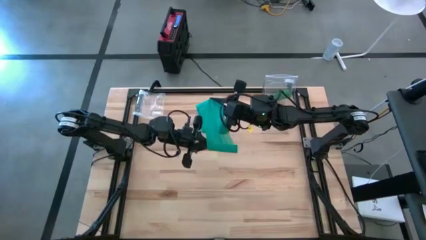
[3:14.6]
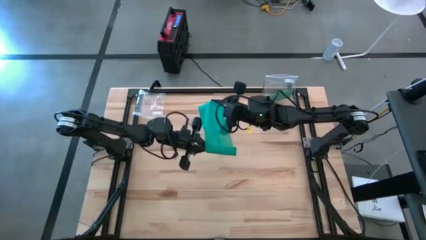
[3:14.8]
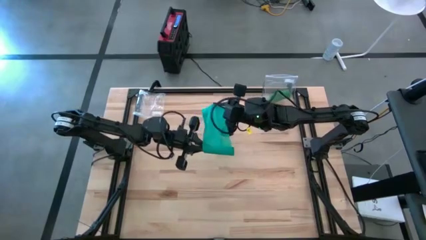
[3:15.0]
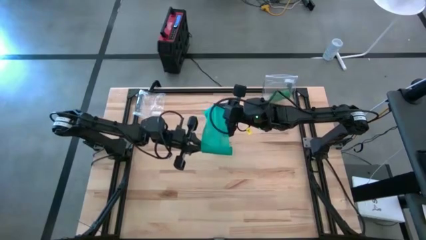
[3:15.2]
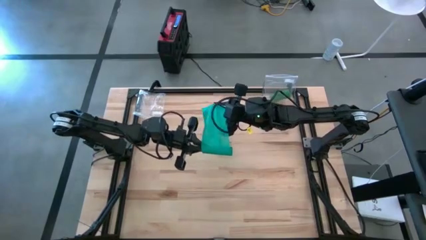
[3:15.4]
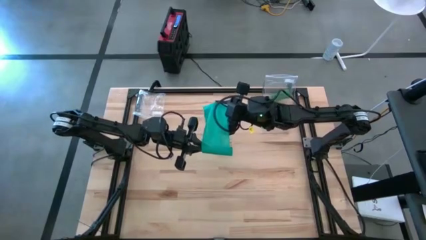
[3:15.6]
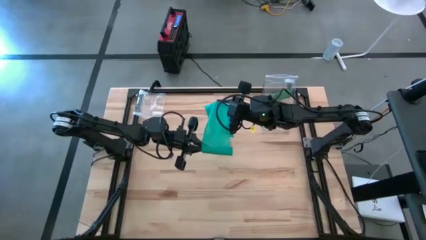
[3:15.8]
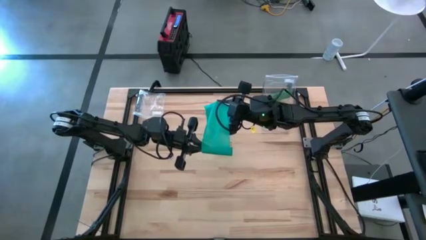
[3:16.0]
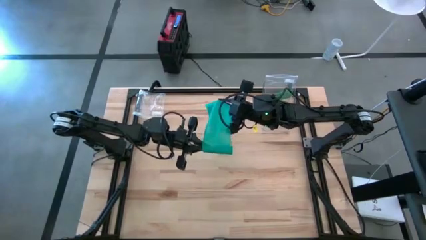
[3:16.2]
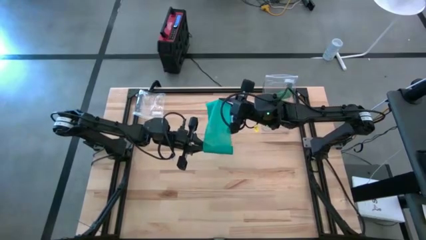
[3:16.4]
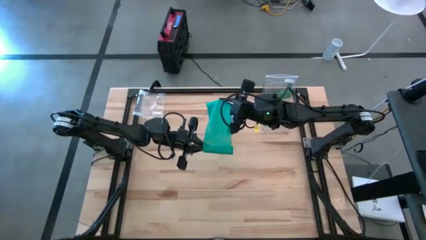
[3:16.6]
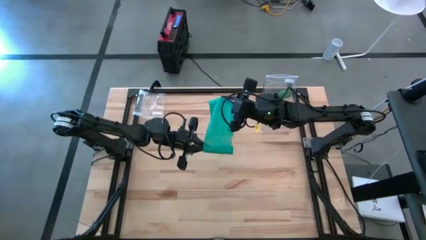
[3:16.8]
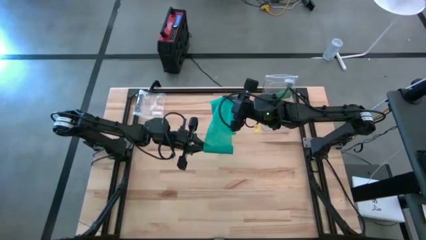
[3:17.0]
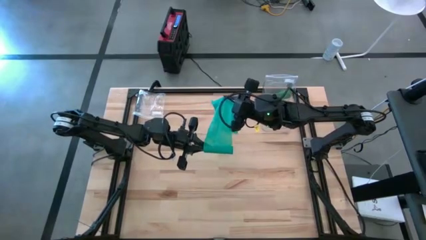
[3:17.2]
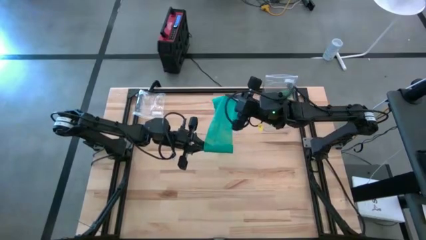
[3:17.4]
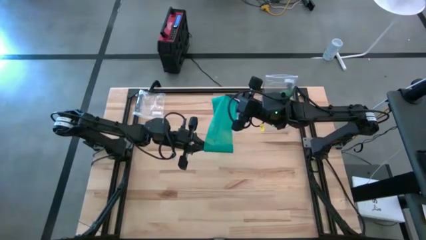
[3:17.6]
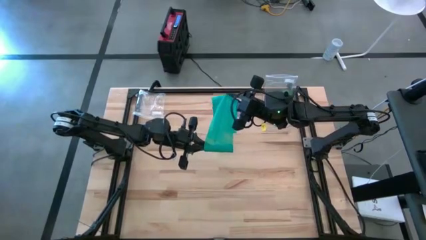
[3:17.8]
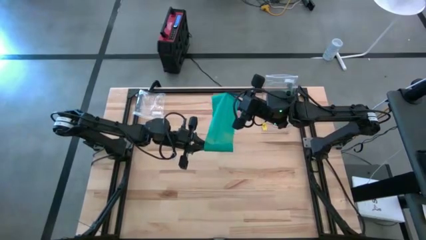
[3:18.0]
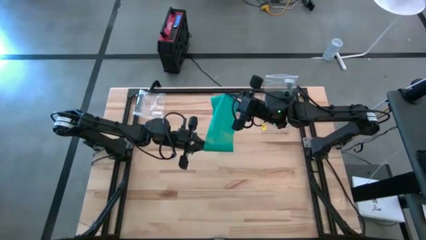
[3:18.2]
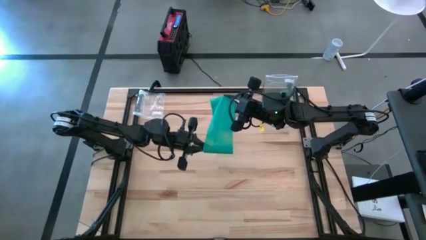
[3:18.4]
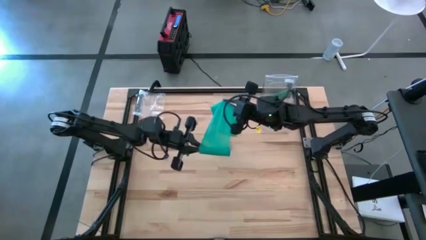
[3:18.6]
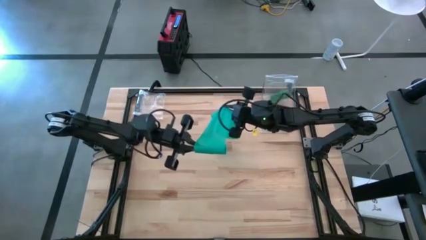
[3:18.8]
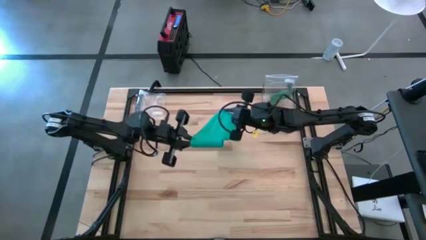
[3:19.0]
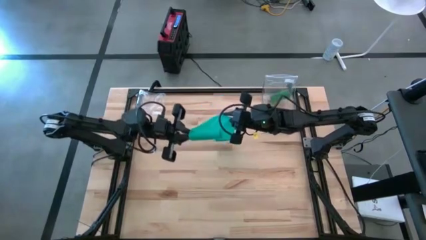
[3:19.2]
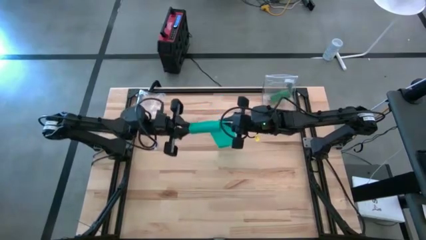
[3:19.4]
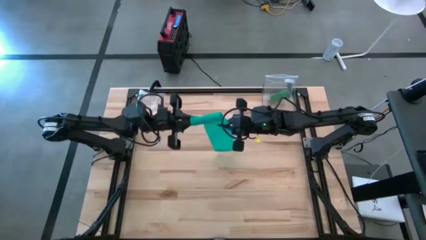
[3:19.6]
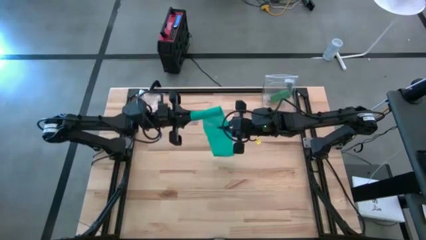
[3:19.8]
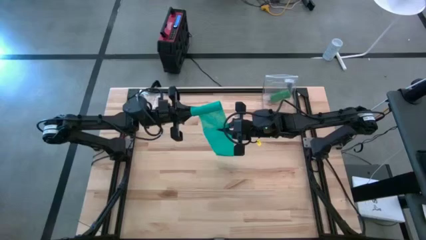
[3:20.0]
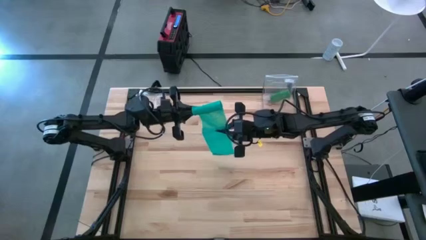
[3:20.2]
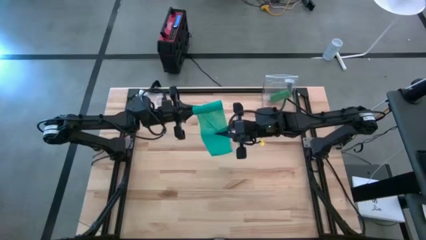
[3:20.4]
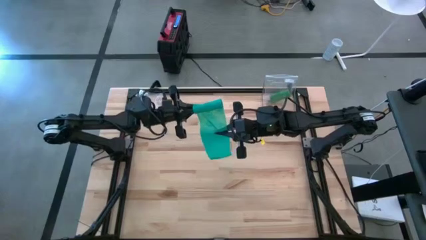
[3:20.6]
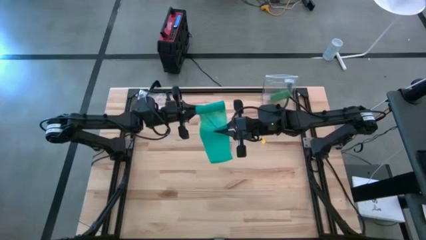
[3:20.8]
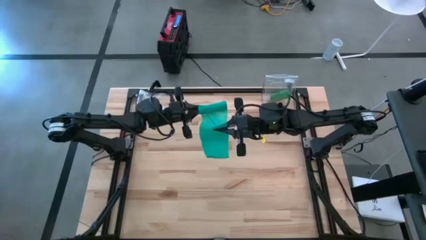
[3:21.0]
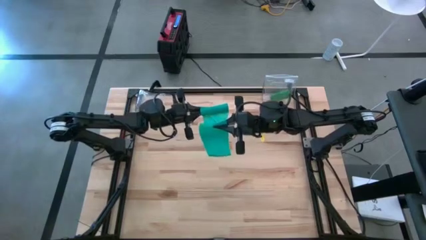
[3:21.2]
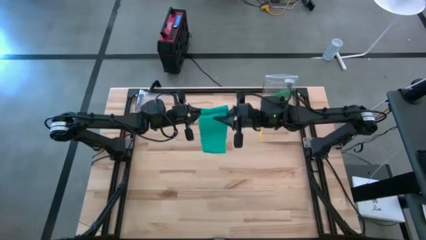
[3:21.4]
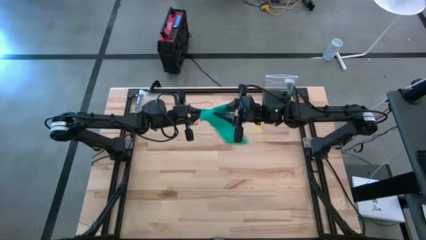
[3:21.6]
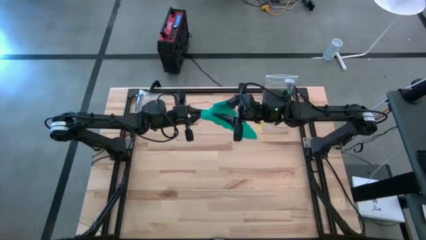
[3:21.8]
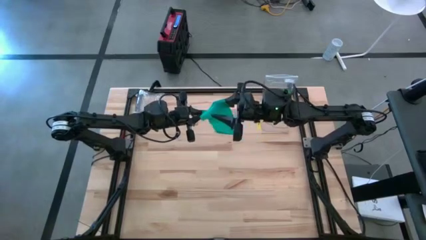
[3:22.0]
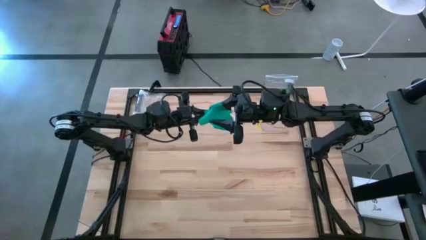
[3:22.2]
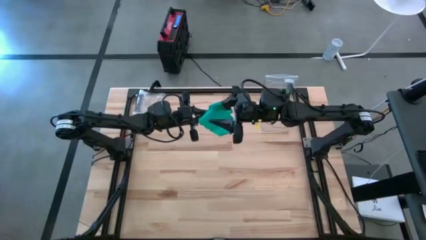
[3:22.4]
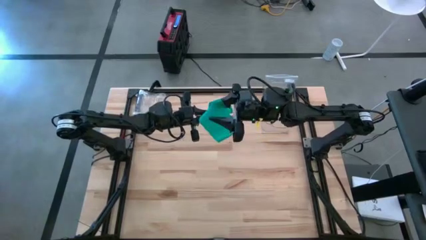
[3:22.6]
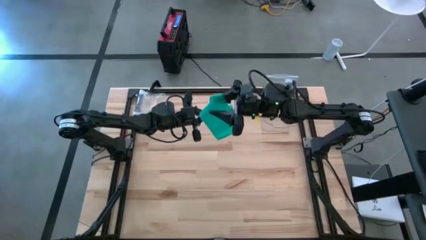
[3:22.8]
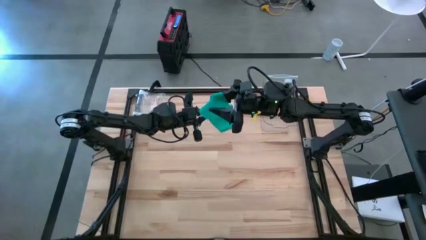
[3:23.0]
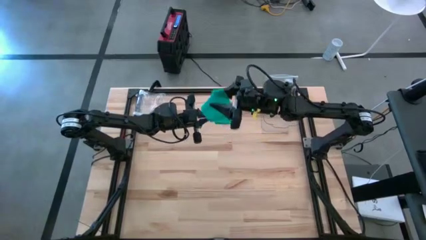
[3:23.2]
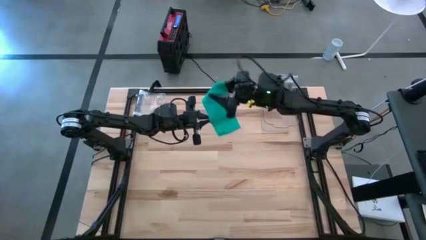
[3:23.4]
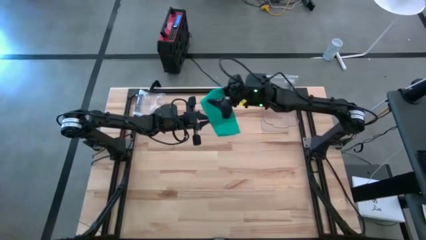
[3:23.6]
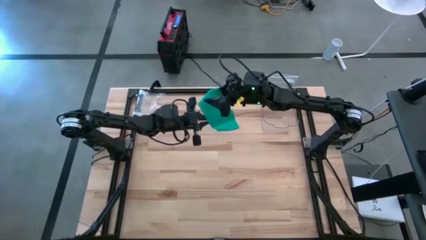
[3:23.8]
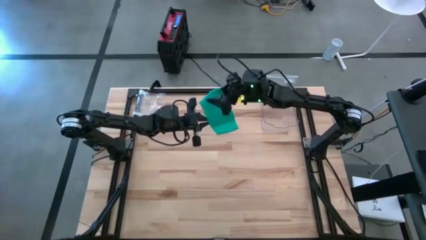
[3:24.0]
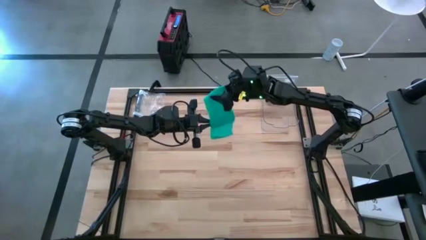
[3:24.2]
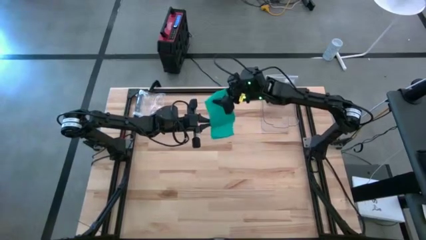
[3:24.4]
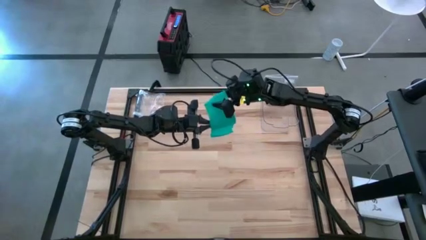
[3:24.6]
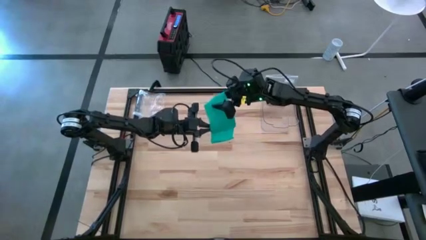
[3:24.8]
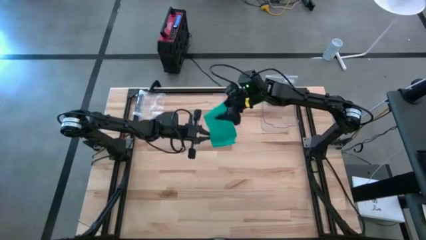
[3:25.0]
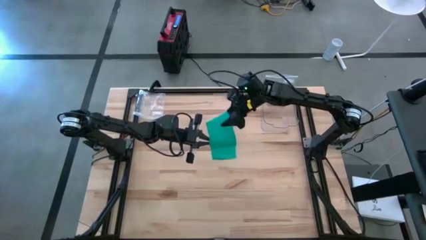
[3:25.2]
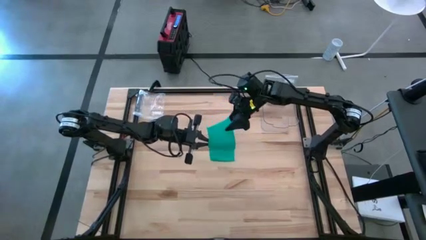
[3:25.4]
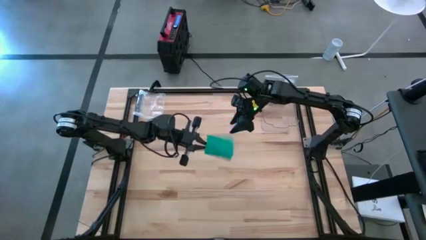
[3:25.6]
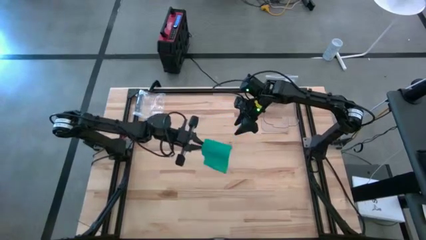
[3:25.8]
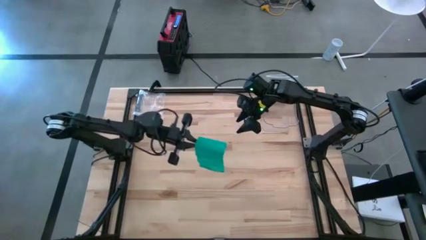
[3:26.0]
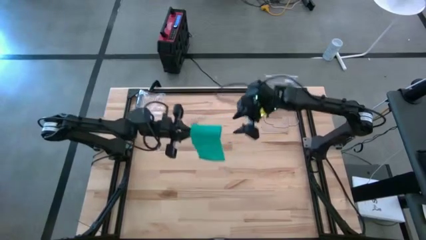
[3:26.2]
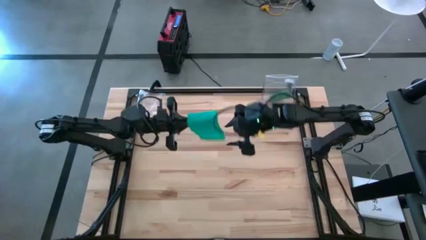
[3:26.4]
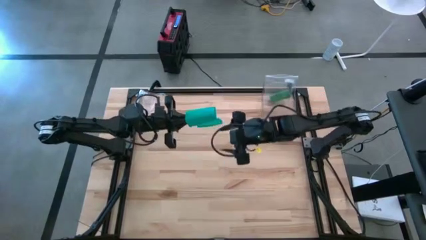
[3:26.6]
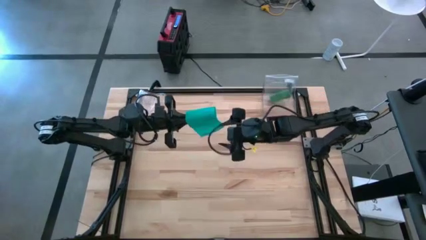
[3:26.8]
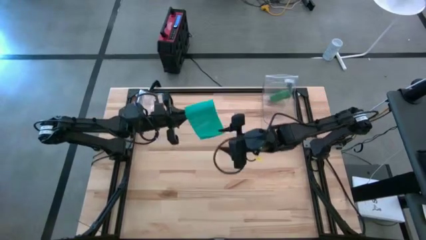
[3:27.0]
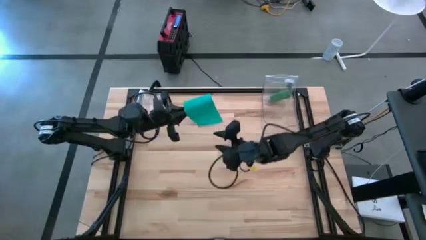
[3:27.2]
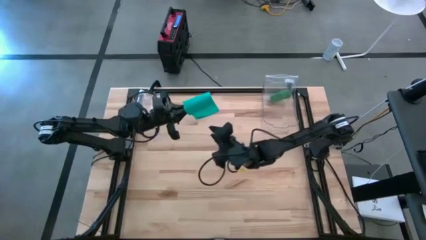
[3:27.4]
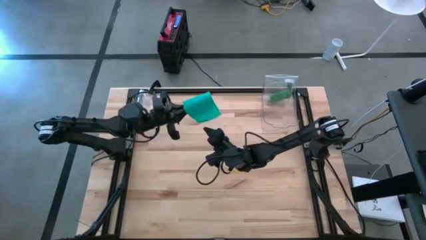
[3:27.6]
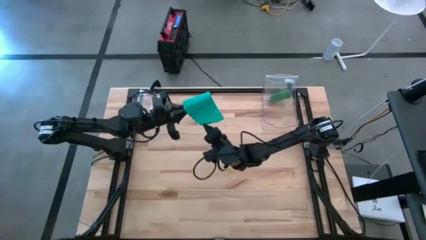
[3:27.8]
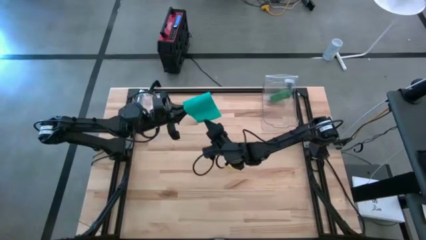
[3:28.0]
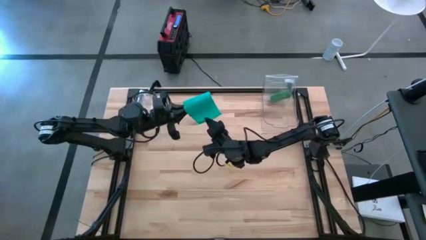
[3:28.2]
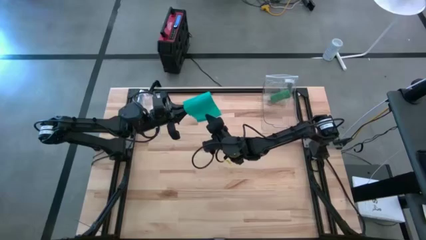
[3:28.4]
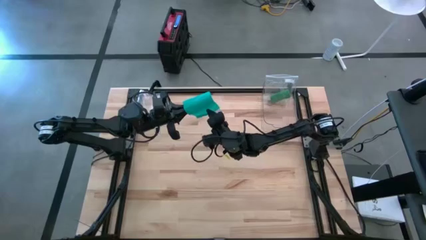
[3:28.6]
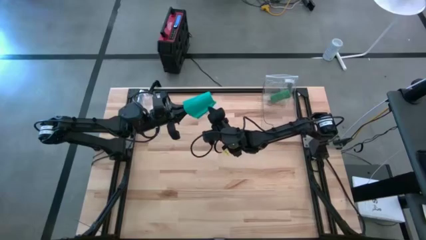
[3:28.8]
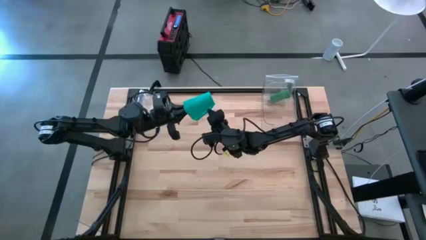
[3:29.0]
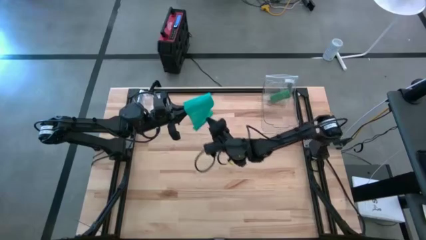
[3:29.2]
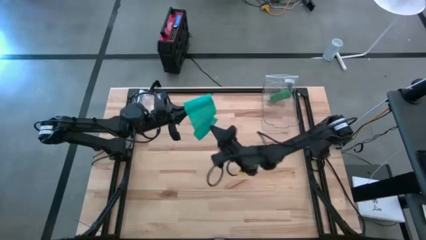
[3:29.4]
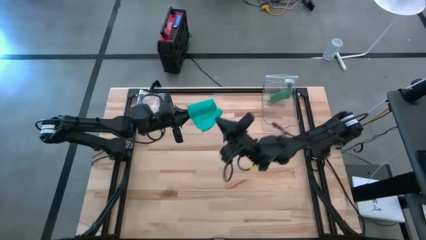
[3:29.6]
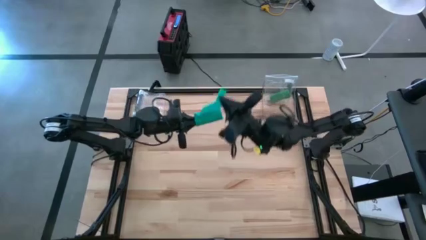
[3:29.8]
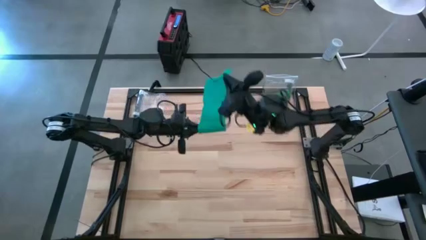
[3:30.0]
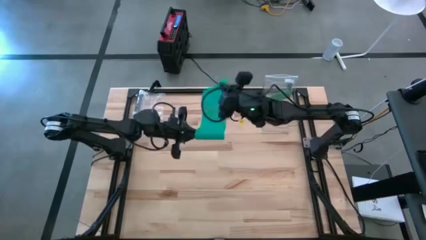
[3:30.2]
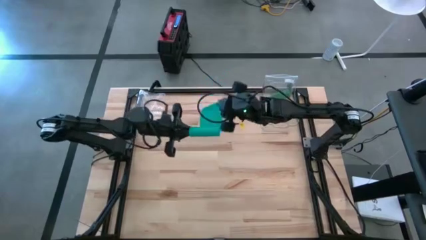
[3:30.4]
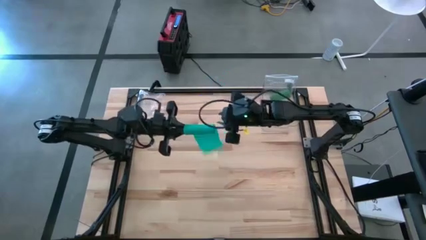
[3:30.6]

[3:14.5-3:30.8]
Task: Roll bandage
Roll the dark green bandage
